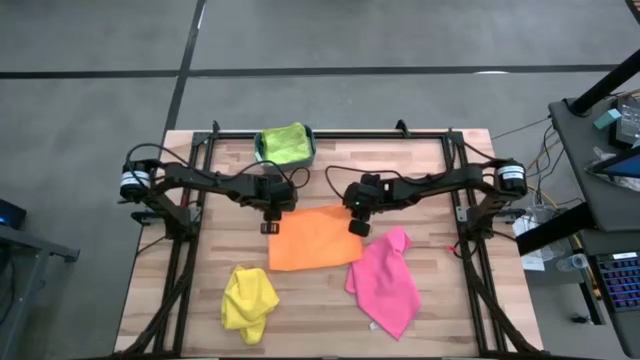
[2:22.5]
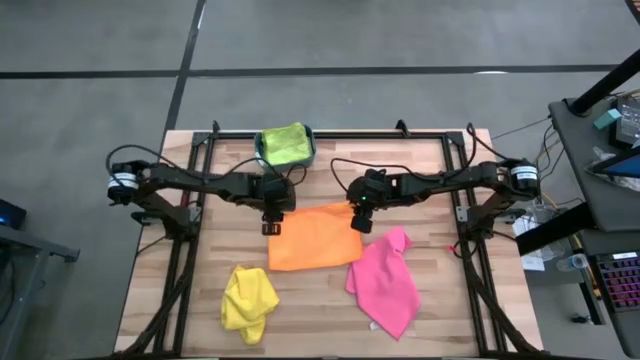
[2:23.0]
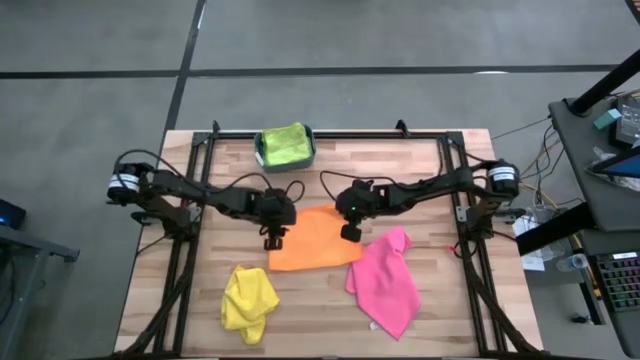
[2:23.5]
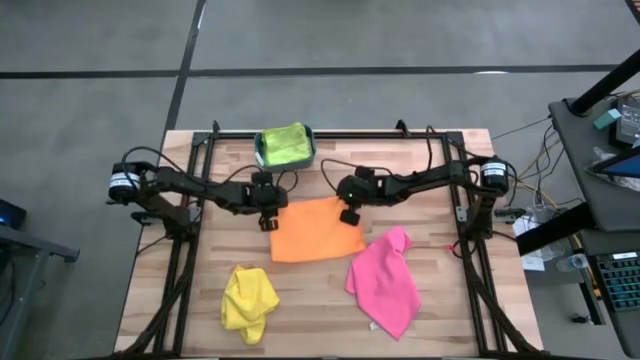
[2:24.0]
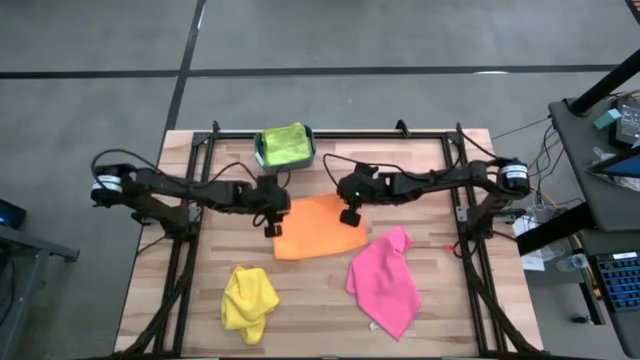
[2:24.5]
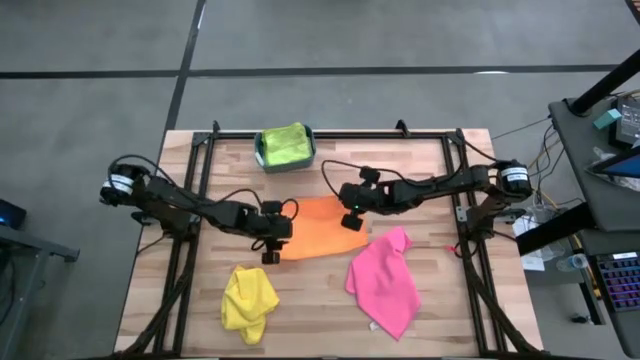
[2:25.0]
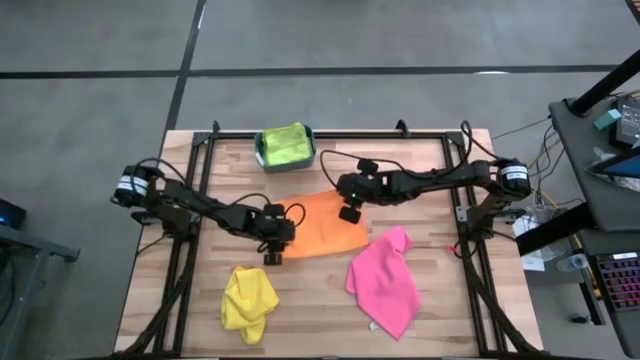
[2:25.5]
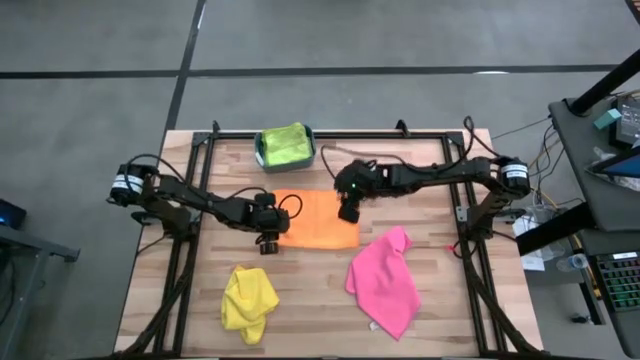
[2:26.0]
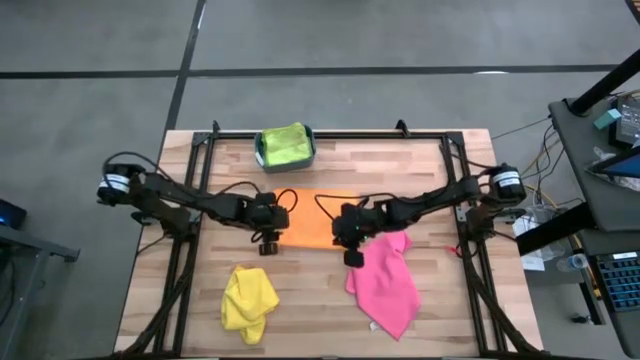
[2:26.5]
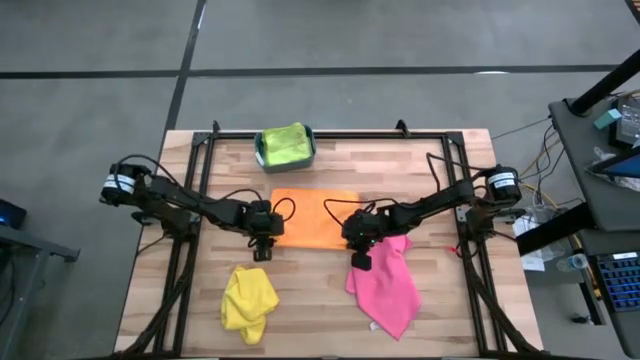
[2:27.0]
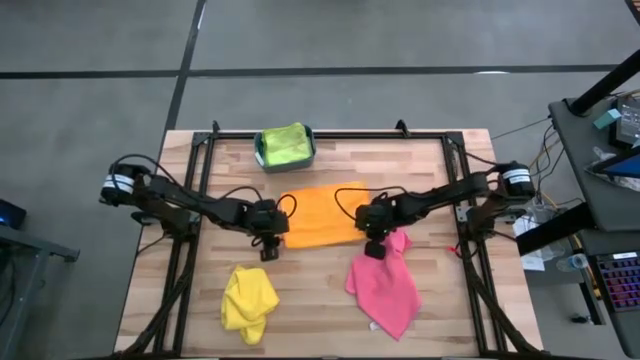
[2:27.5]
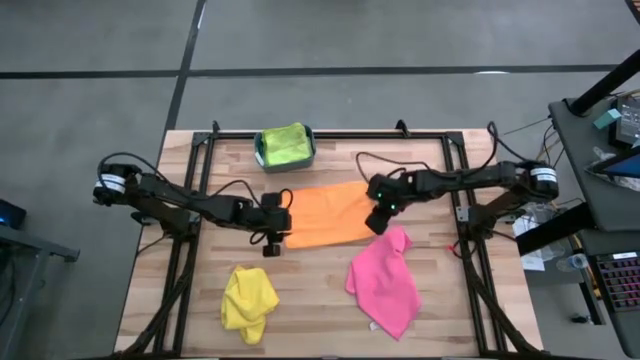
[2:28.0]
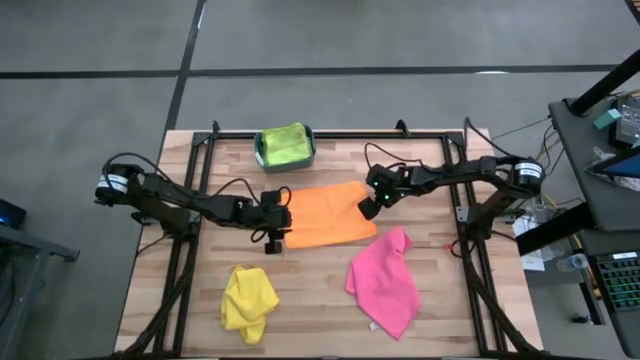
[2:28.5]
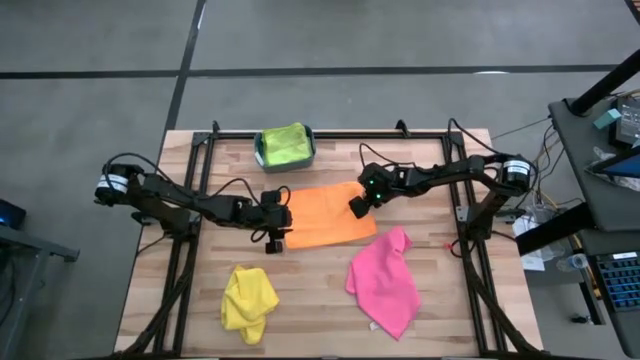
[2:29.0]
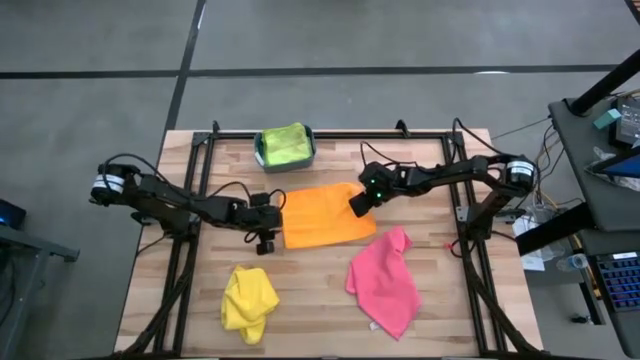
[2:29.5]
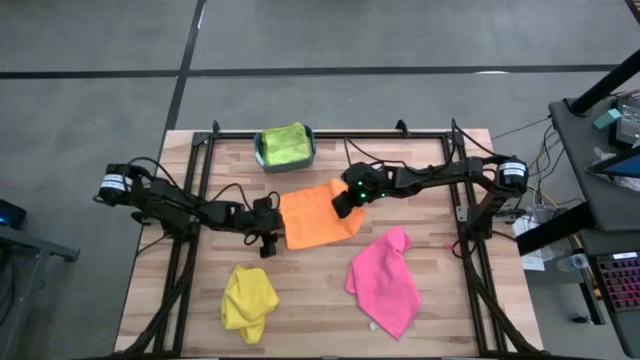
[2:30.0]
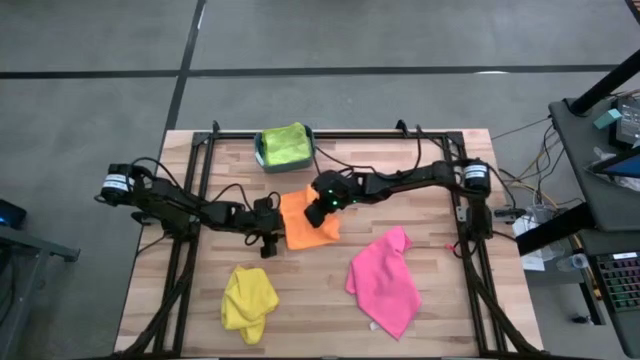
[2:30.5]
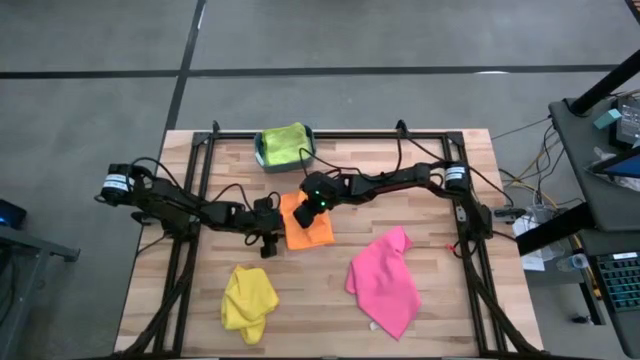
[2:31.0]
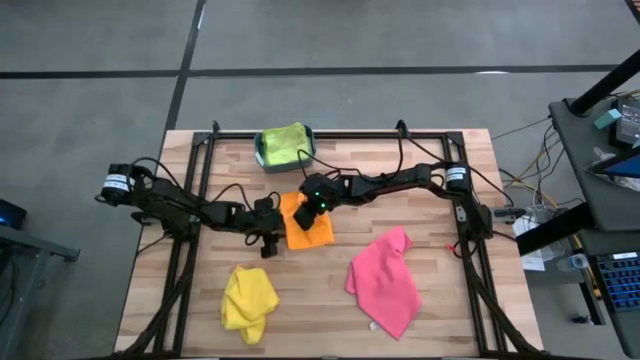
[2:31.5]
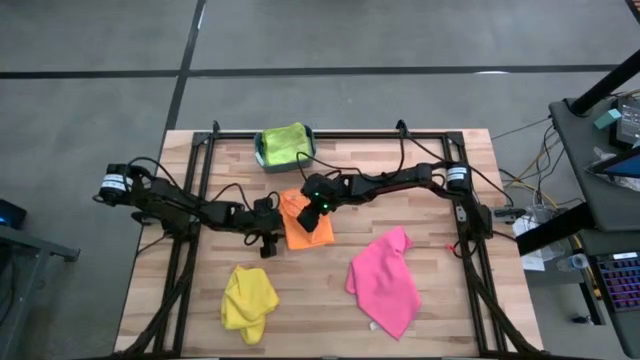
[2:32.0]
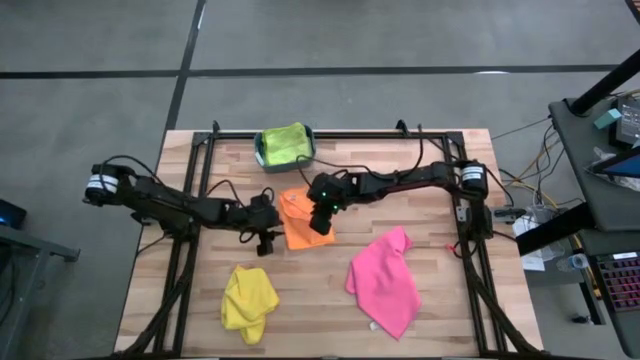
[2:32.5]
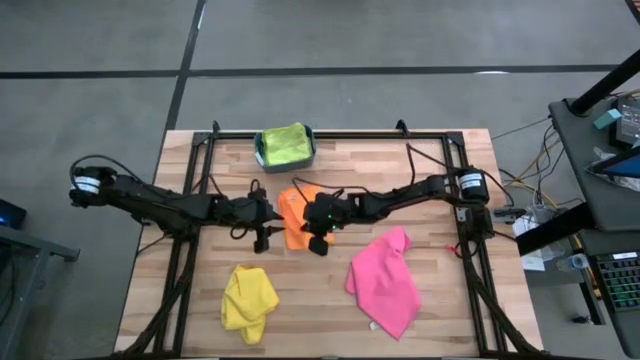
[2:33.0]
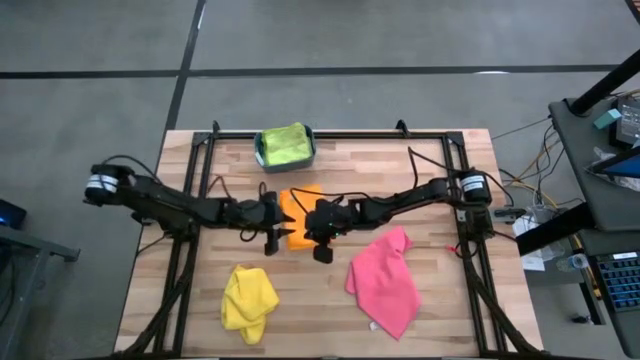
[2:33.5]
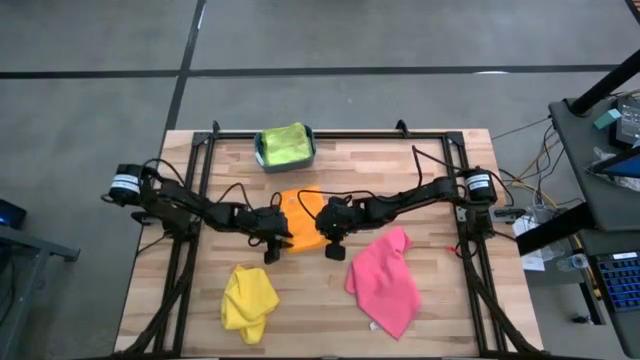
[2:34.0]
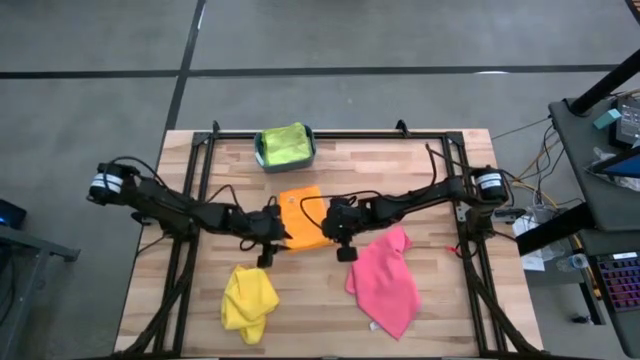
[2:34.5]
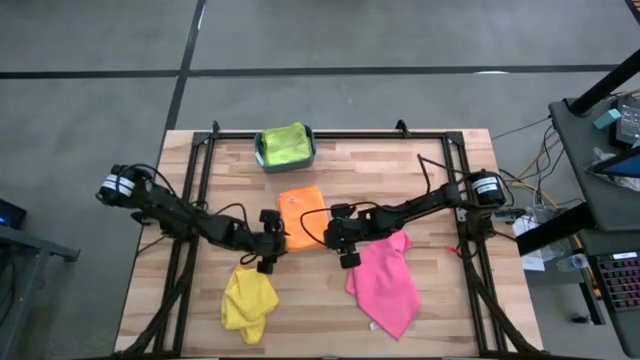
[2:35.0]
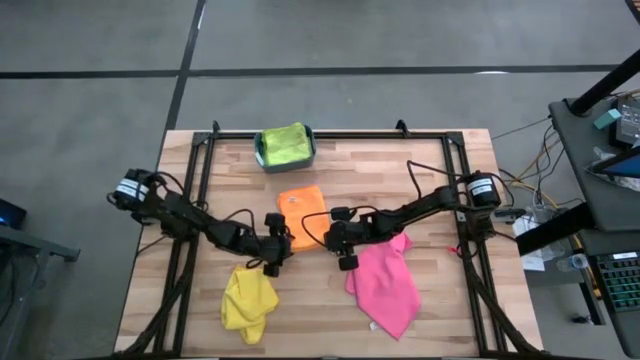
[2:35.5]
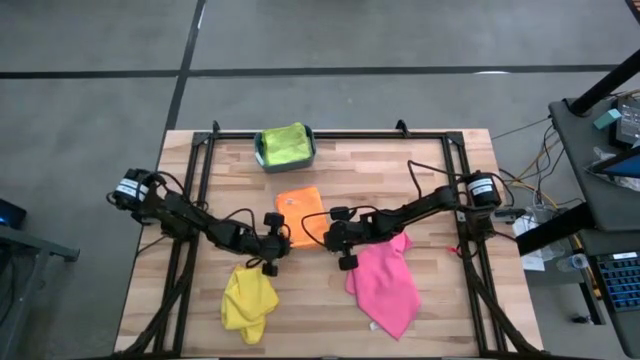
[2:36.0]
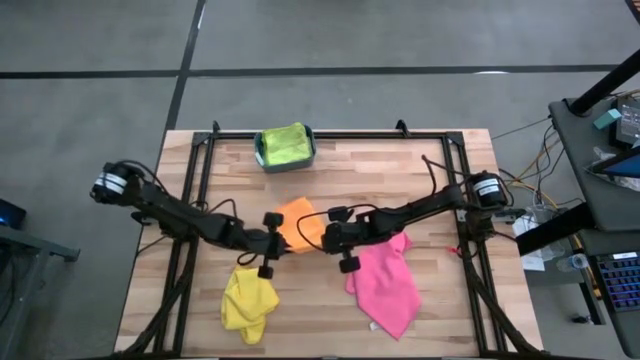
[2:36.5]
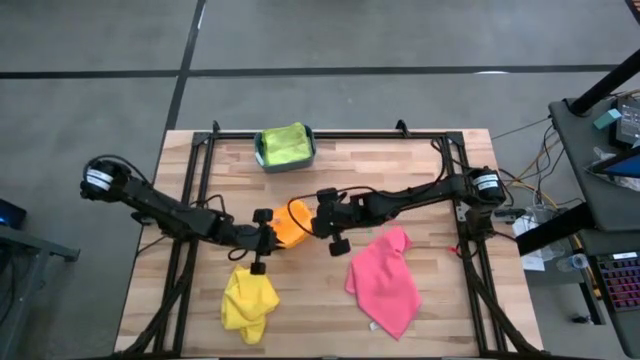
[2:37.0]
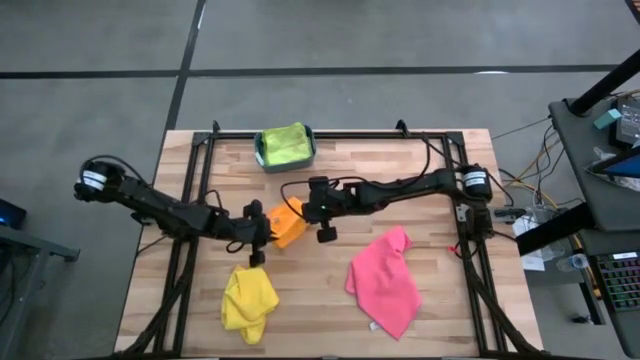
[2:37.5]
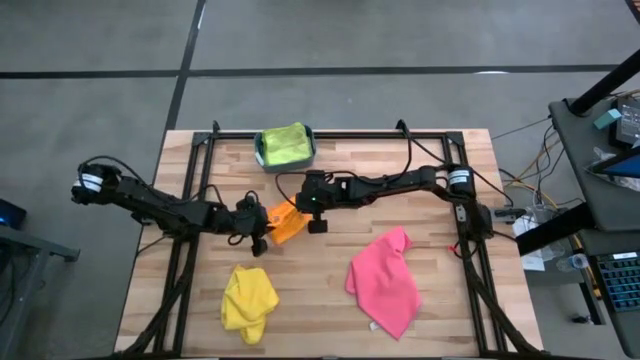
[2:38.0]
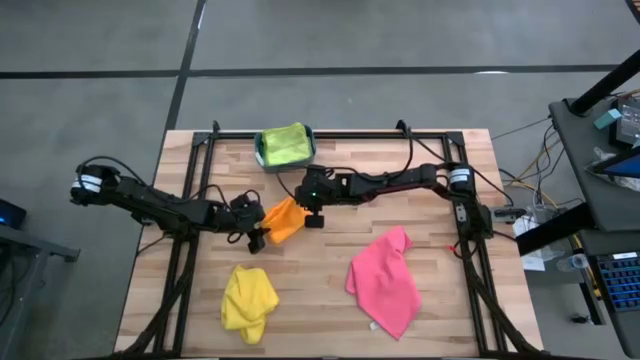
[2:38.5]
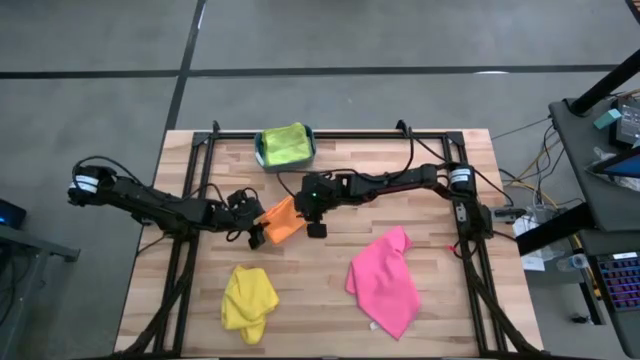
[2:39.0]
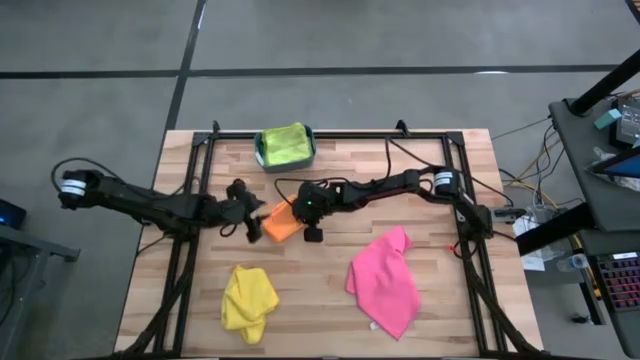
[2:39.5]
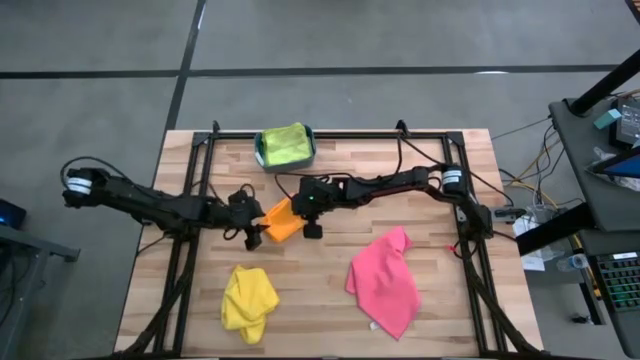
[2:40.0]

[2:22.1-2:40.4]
Task: Fold microfiber towels
Fold the orange towel

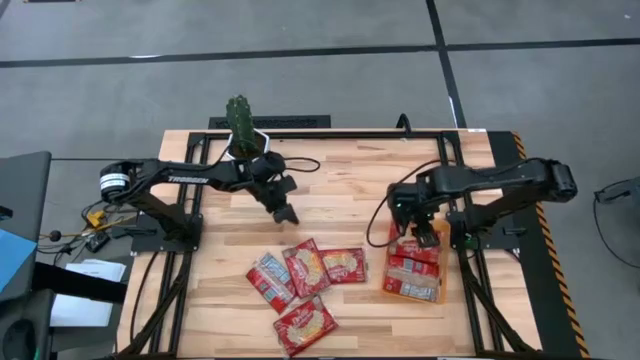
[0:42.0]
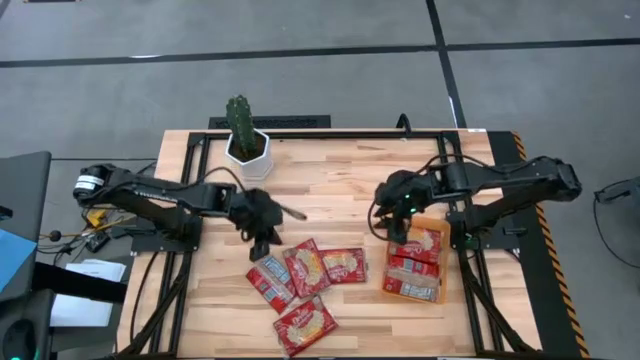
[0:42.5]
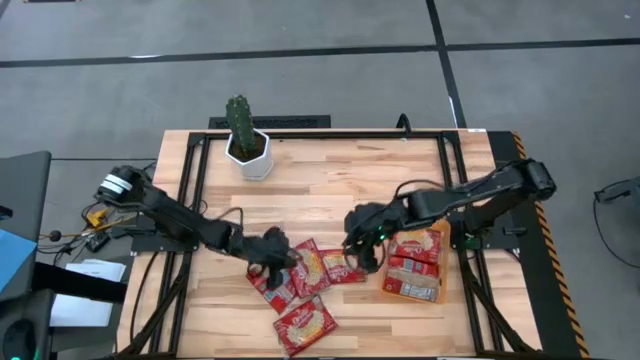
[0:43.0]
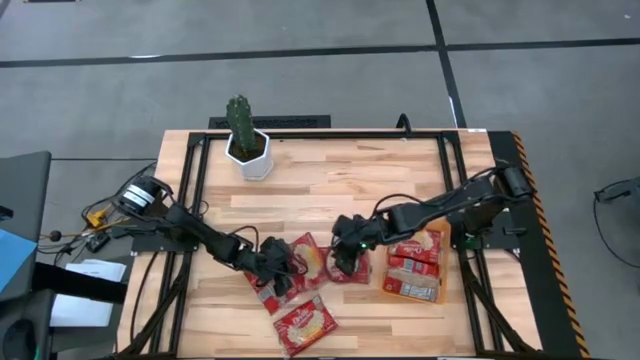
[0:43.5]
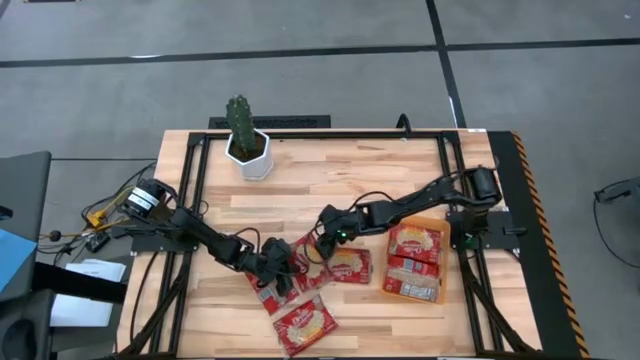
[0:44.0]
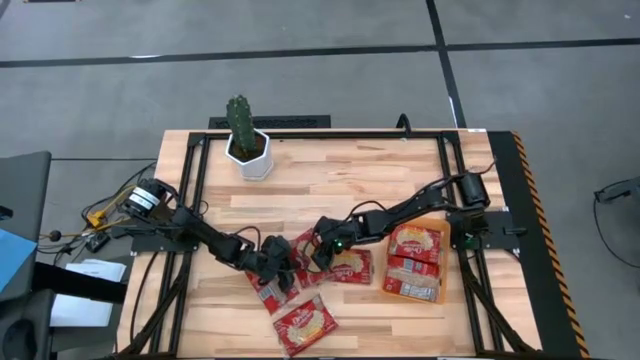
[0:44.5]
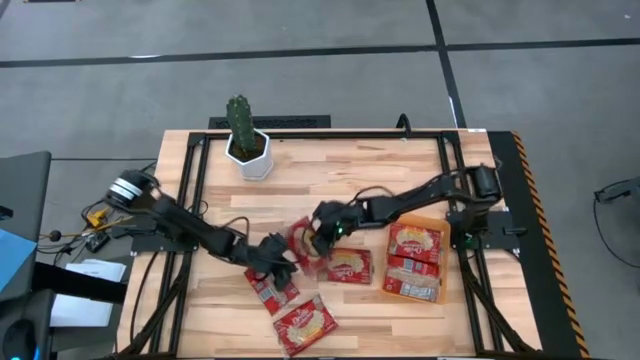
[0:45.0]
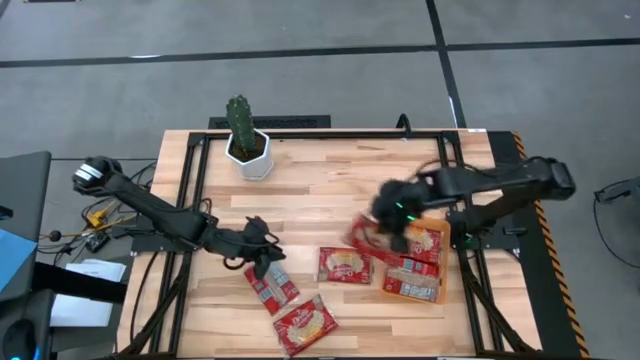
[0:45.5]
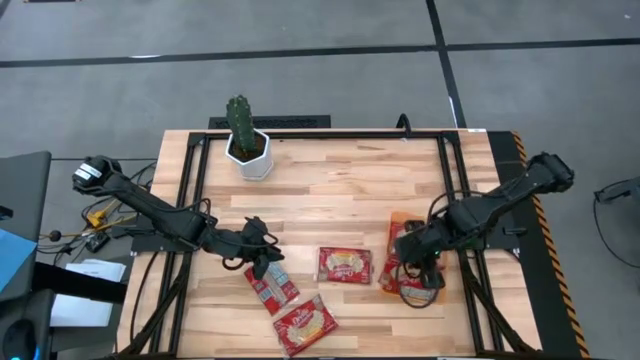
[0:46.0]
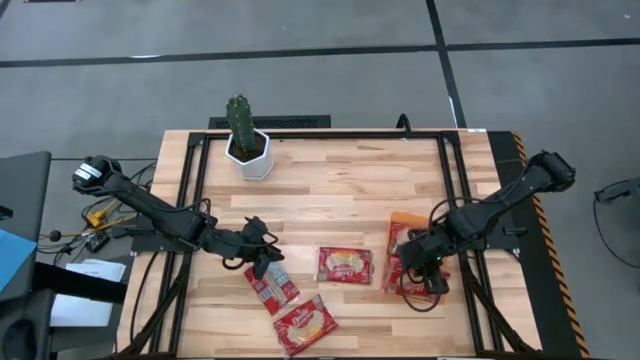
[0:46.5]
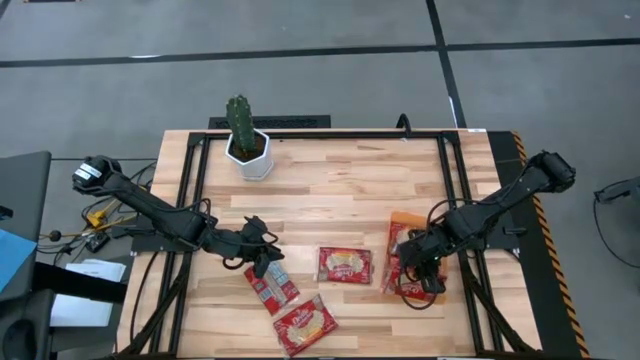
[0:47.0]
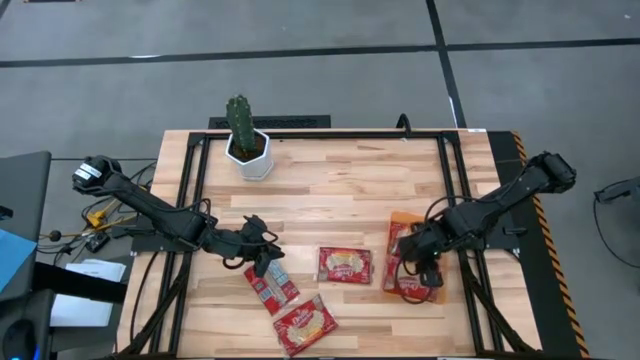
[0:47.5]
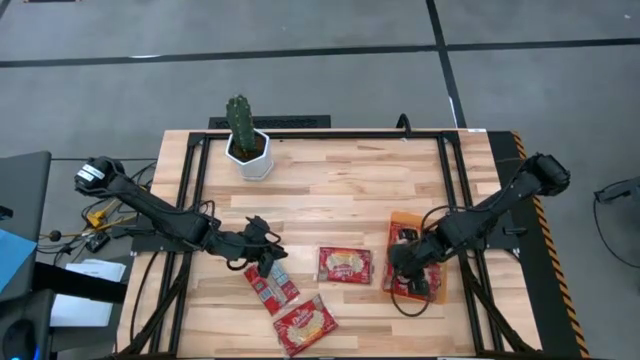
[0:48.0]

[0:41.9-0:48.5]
Task: Sort popcorn bags into baskets
Put the popcorn bag into the orange bin
